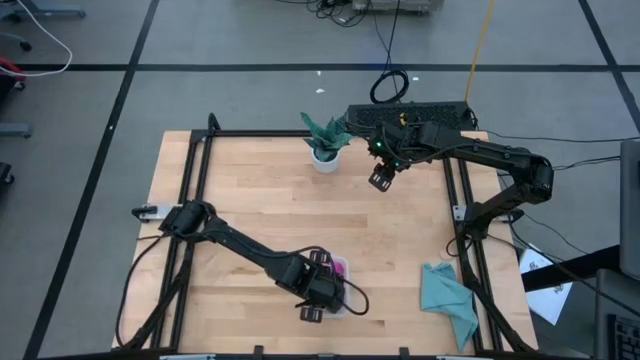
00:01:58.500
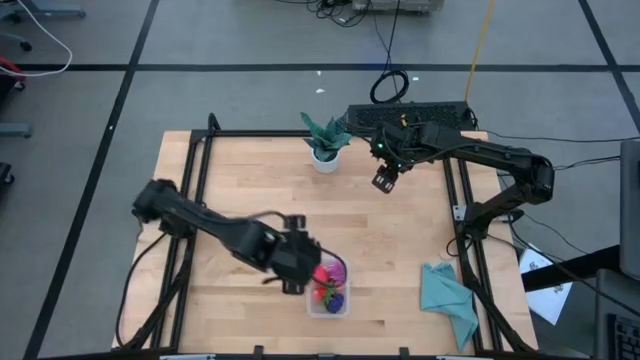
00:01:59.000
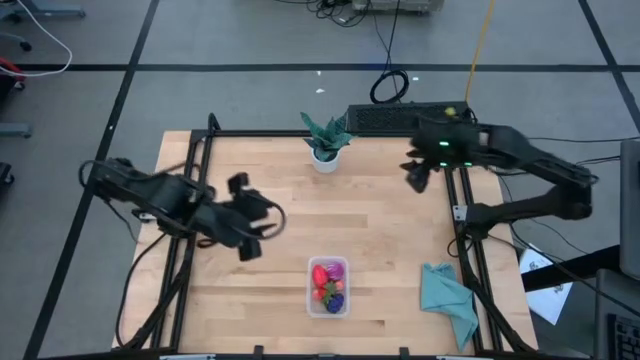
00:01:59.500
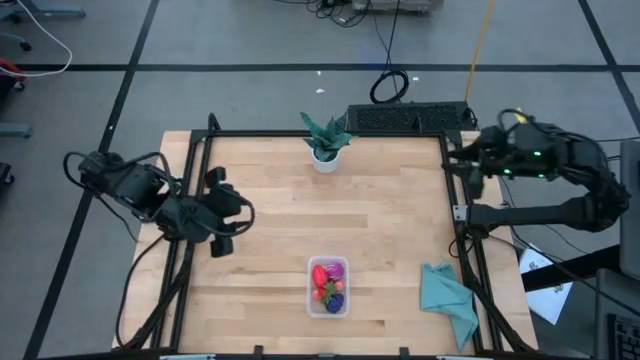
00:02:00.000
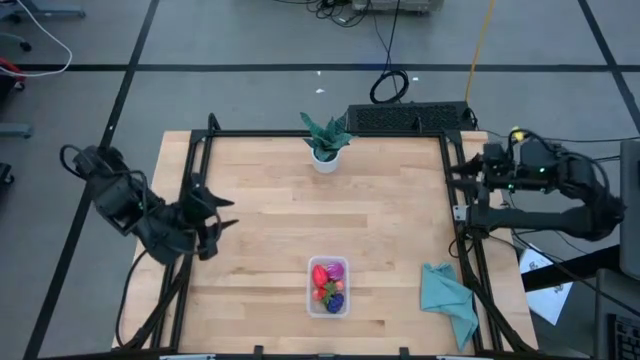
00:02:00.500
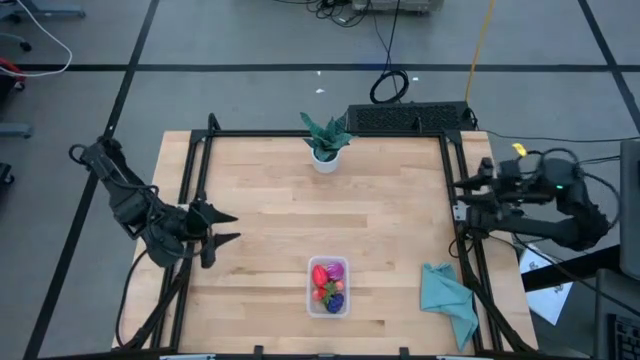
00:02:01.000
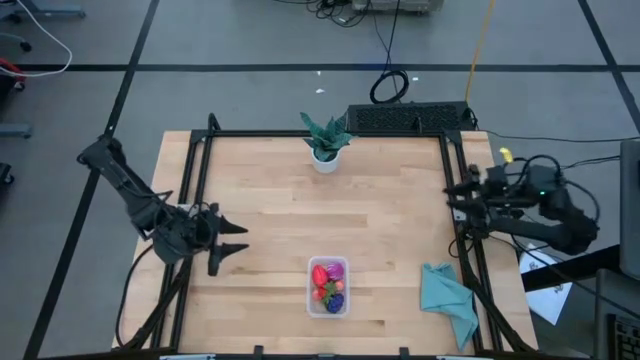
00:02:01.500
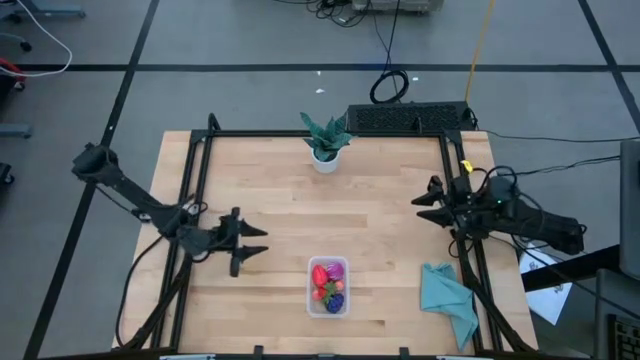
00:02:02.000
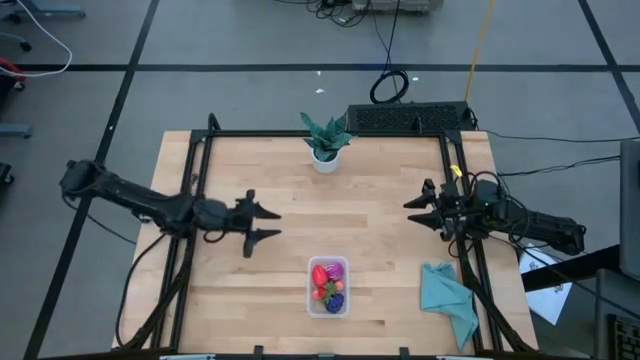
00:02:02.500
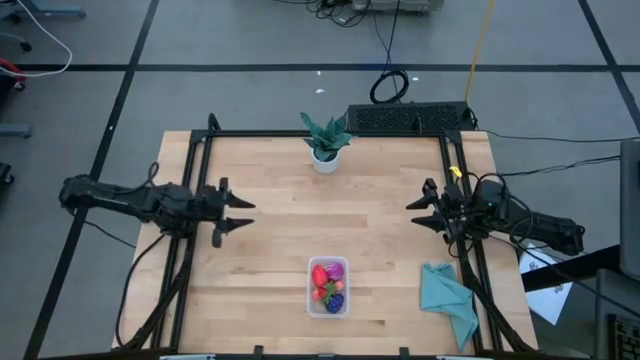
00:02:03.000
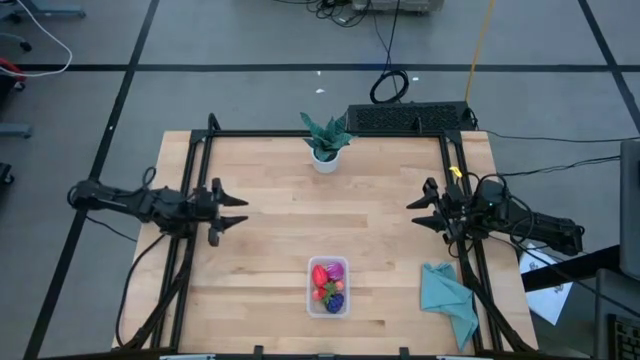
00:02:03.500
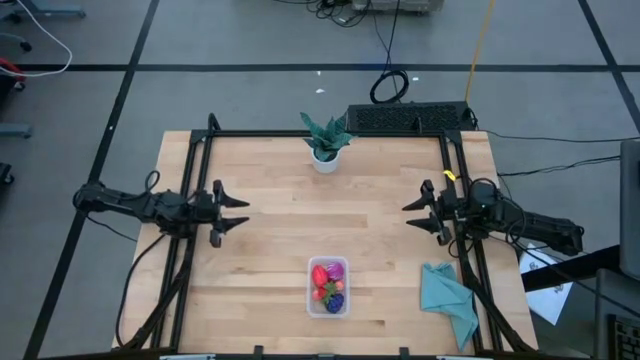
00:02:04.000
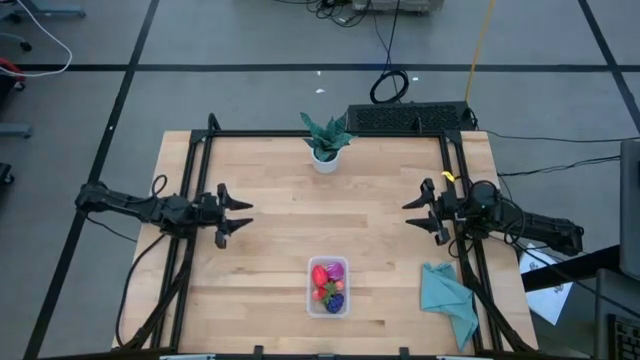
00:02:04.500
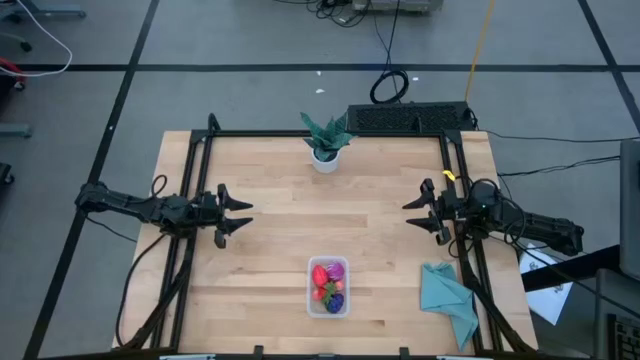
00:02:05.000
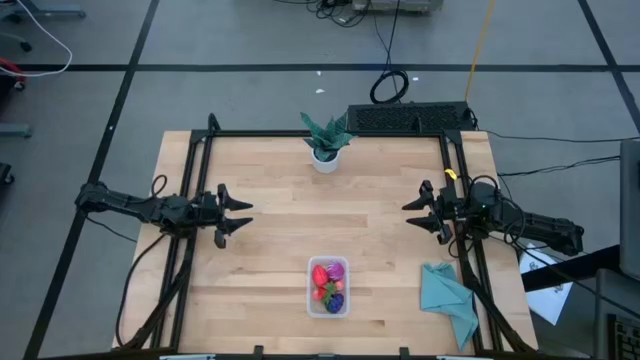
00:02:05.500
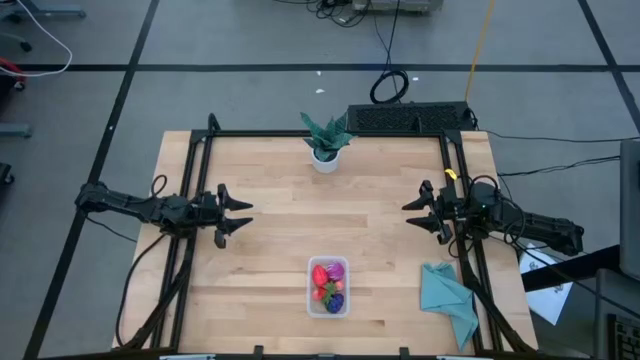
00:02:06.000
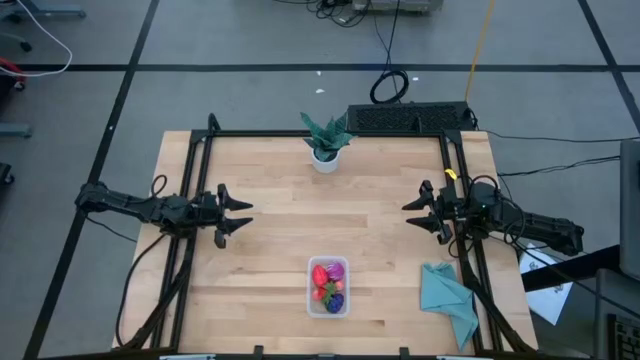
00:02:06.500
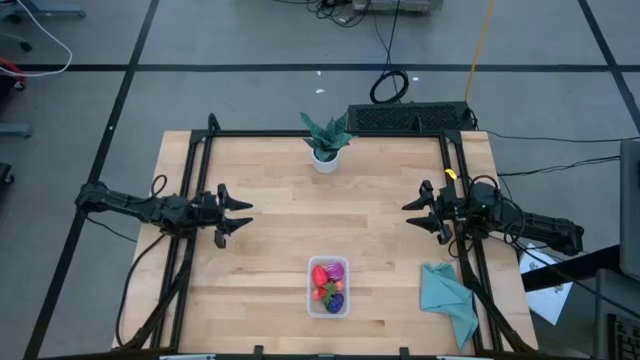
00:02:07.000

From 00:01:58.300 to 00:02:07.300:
Task: Pick and placing Produce into tupperware
Return to Home Position

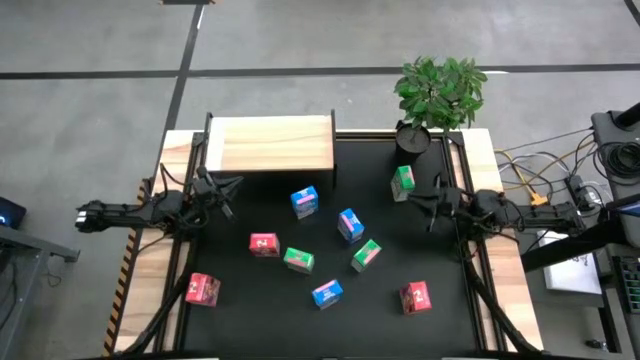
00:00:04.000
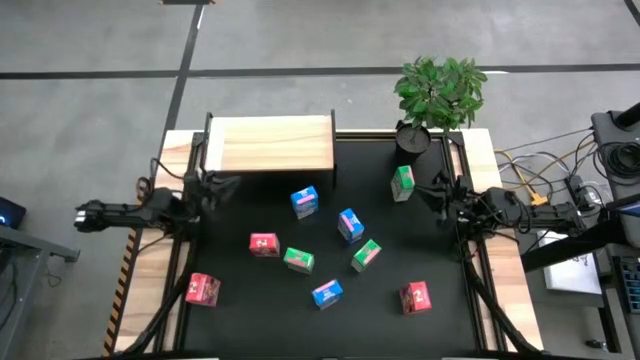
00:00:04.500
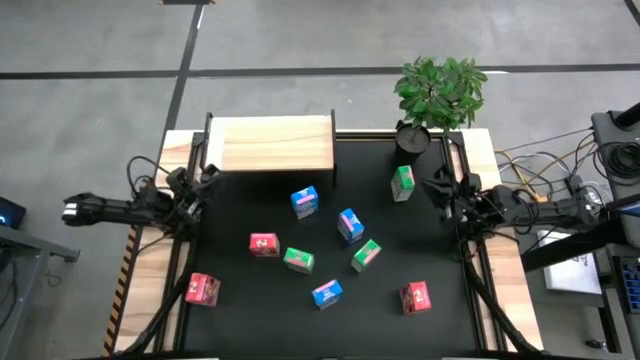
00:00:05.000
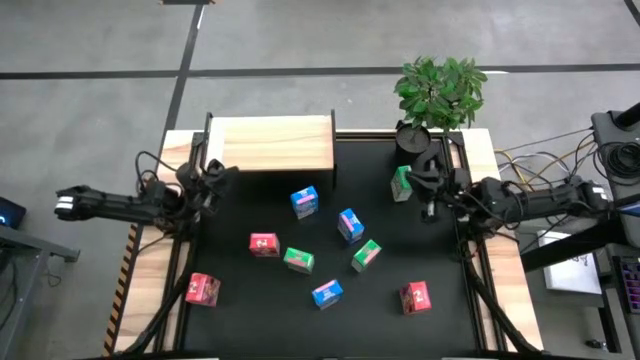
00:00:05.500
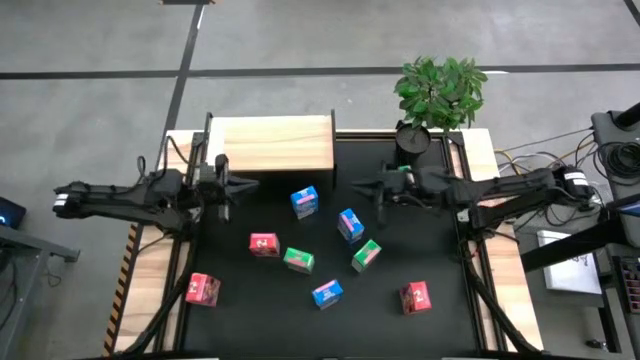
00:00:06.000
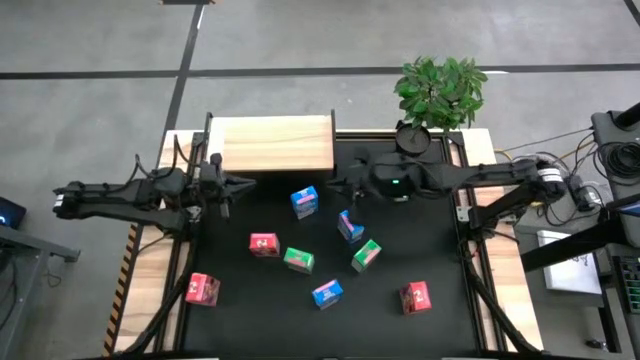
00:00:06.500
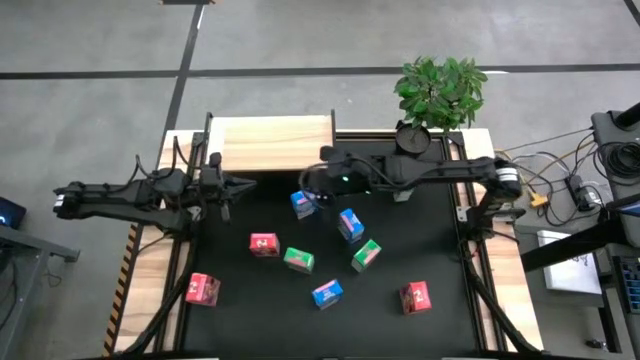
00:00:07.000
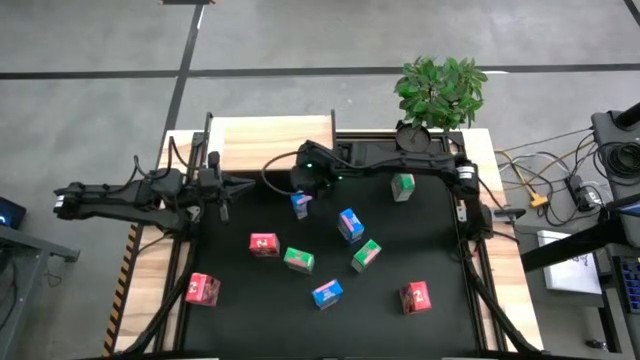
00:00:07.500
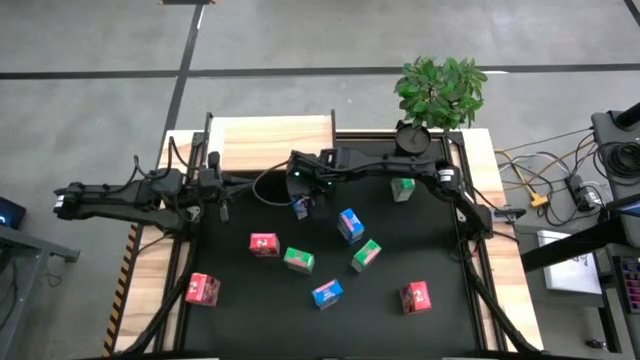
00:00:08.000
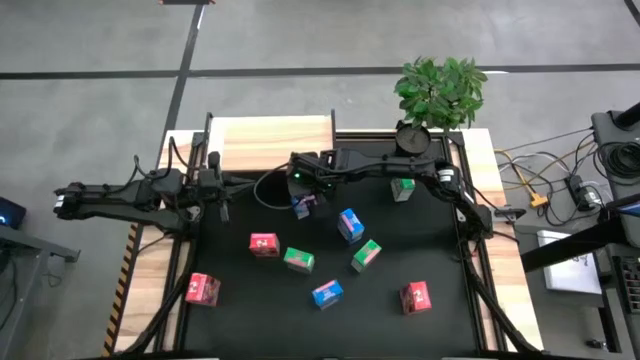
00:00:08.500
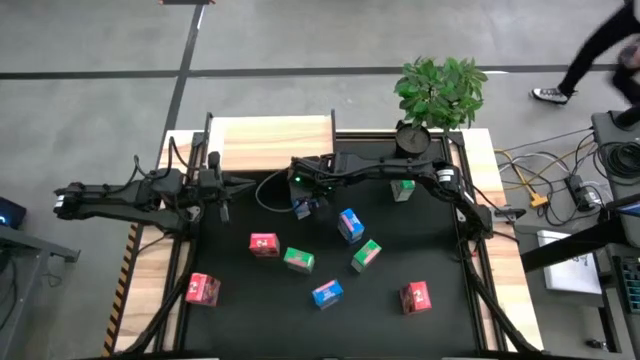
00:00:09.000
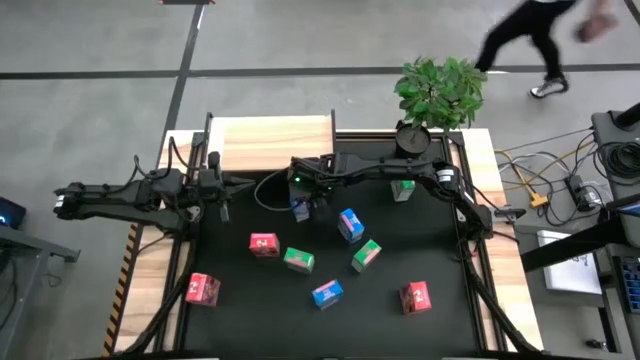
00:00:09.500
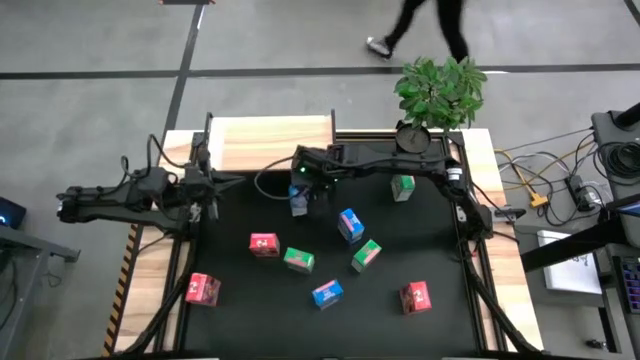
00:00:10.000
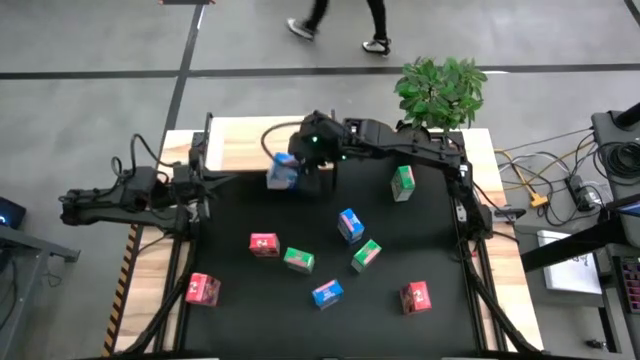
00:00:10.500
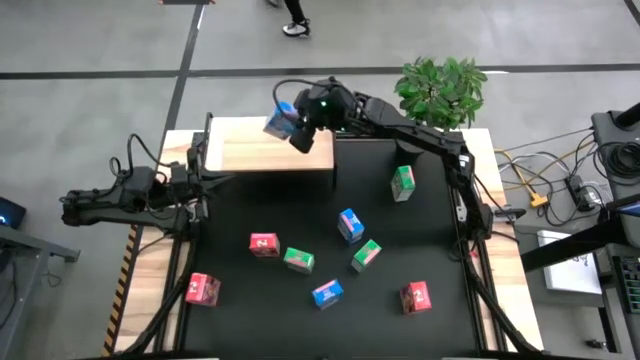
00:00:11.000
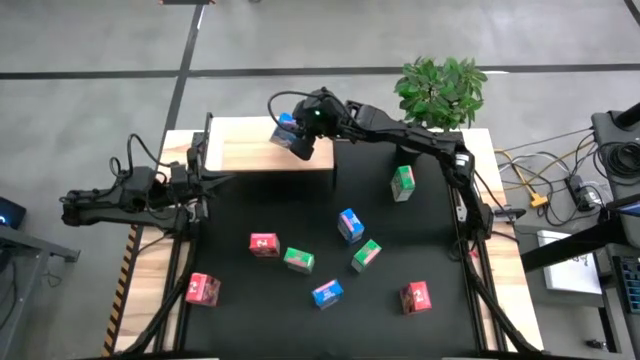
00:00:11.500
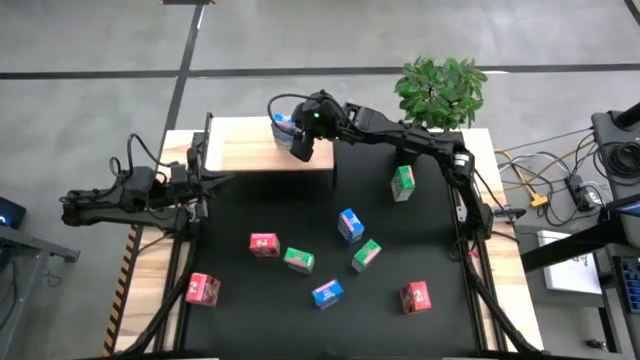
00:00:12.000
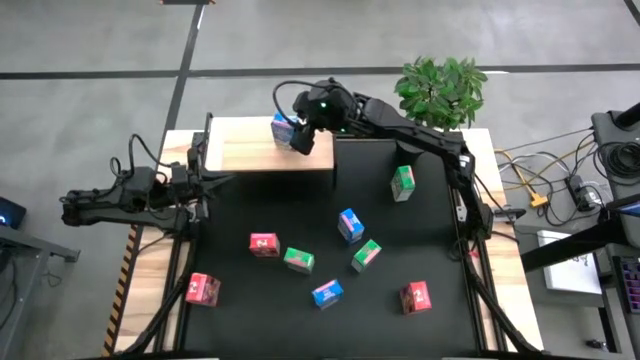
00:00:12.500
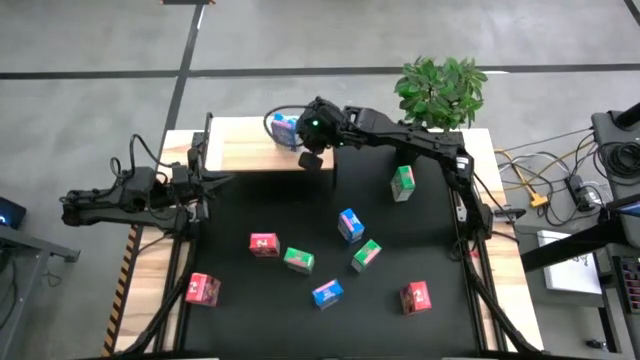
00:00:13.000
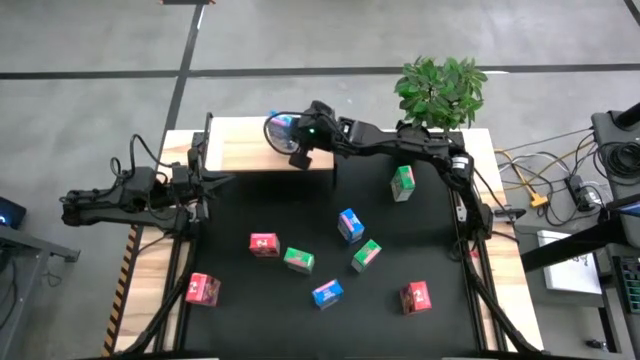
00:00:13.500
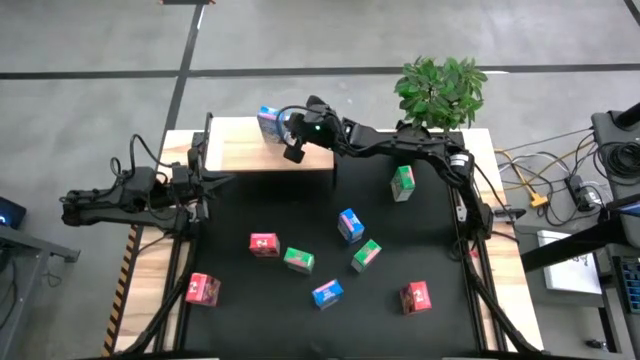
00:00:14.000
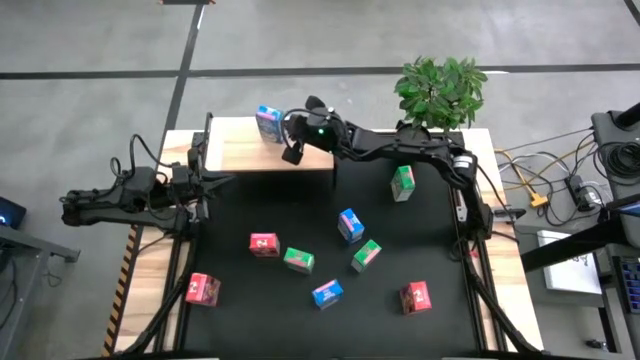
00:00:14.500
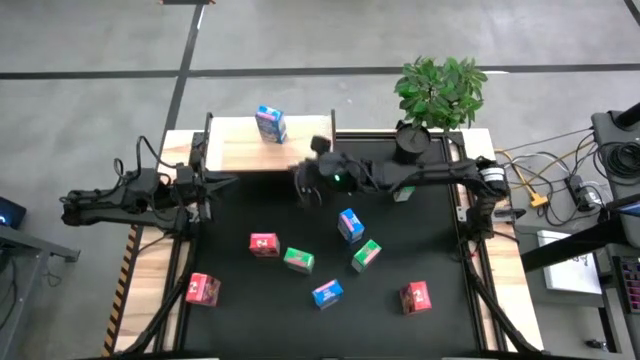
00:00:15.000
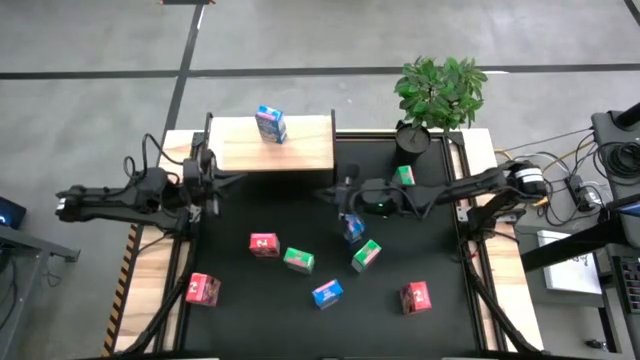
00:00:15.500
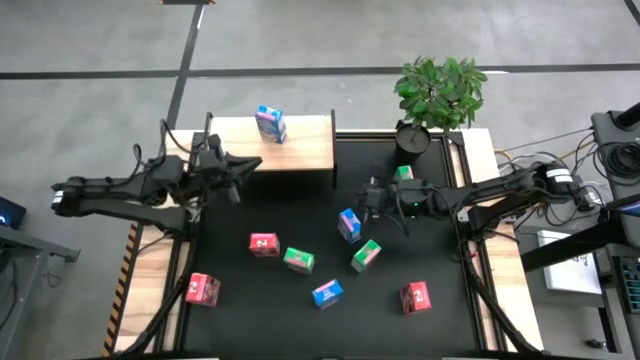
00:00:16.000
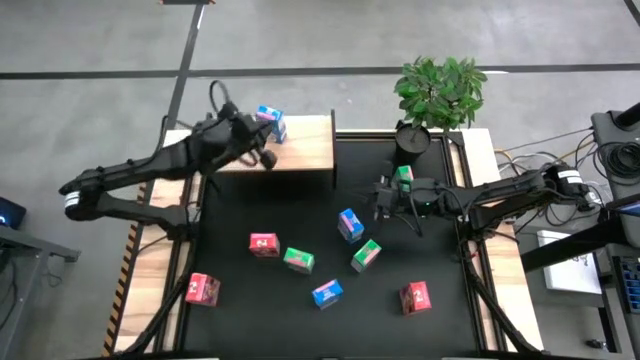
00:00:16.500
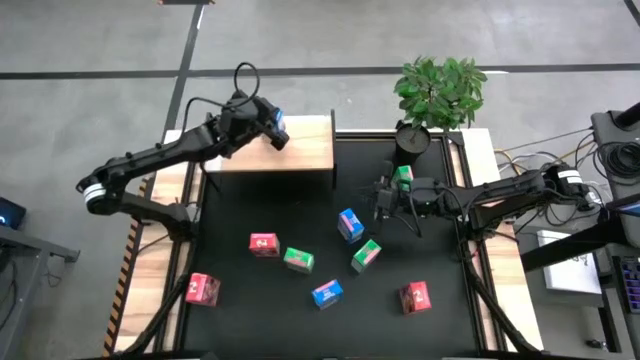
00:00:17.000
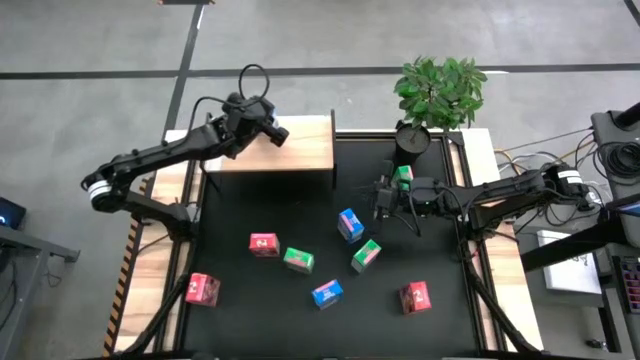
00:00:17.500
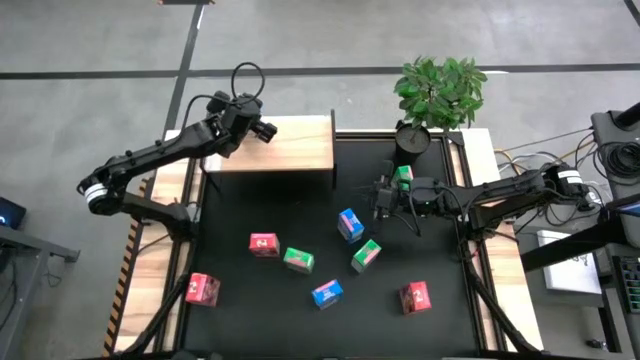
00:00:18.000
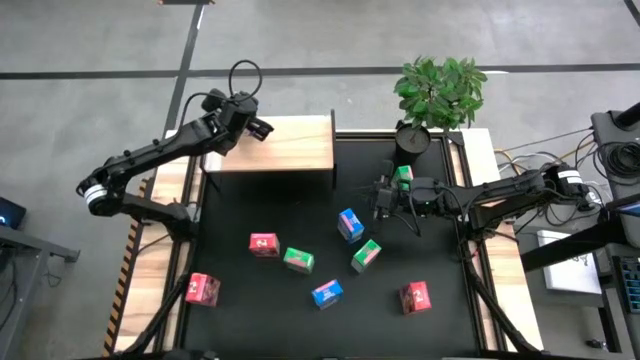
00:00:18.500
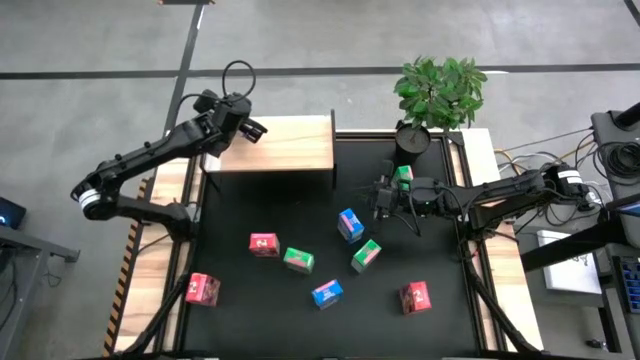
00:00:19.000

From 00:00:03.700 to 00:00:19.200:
Task: Stack cereal on shelf
Put the top blue cereal box on the shelf
